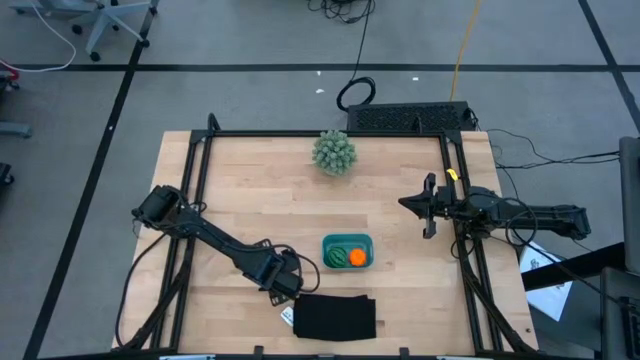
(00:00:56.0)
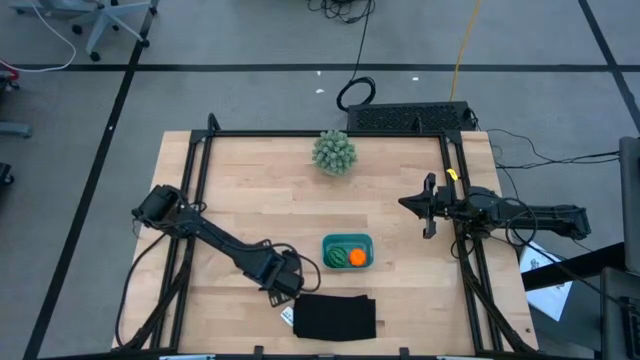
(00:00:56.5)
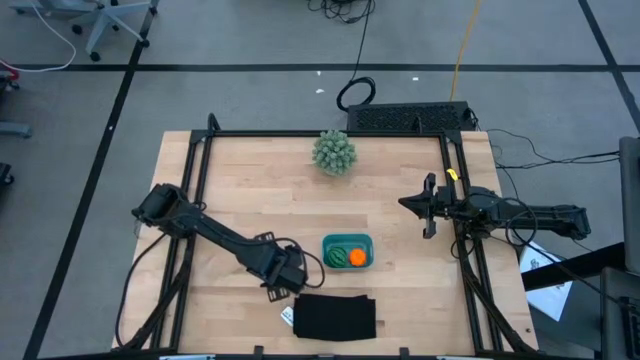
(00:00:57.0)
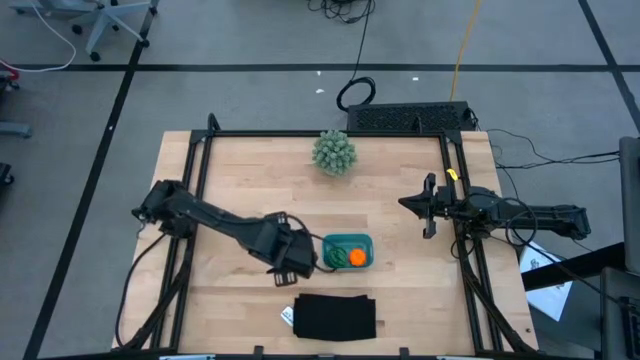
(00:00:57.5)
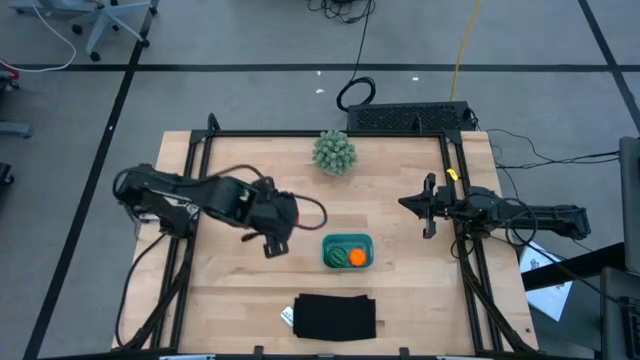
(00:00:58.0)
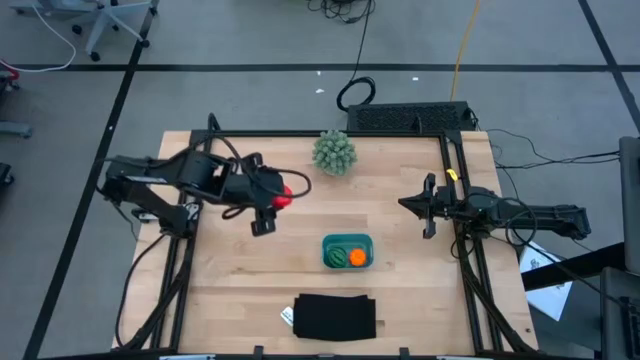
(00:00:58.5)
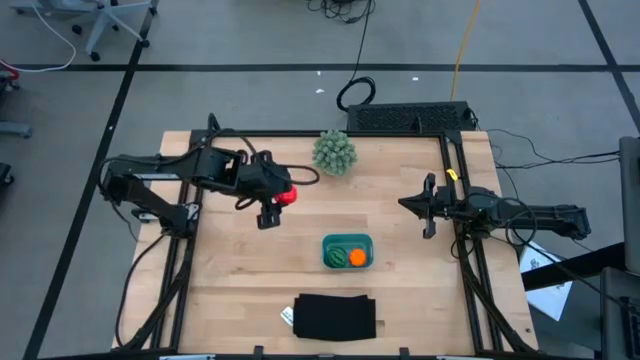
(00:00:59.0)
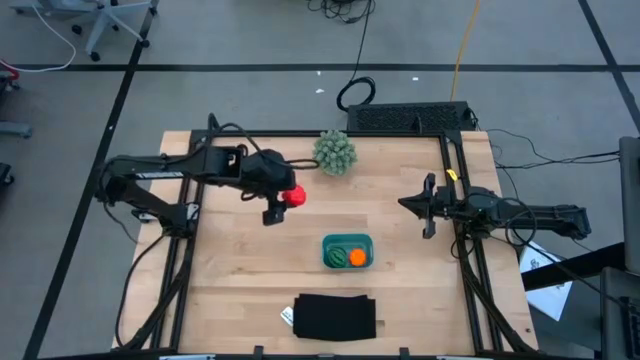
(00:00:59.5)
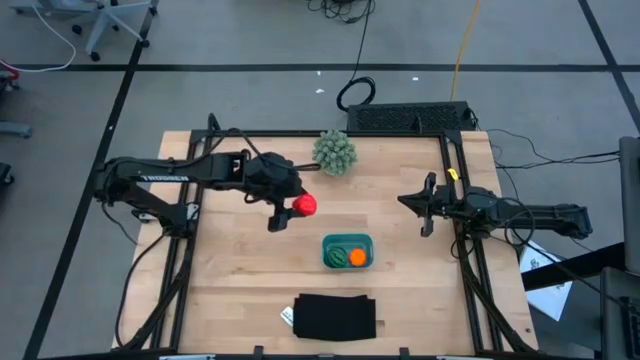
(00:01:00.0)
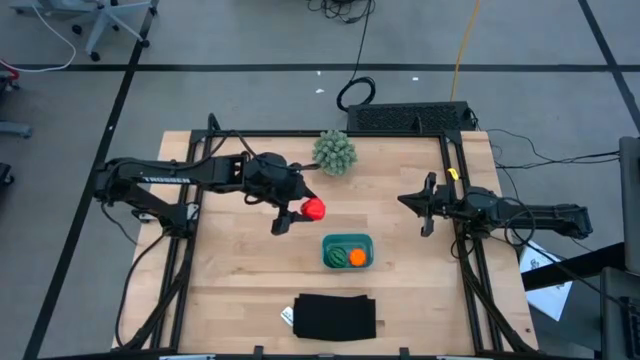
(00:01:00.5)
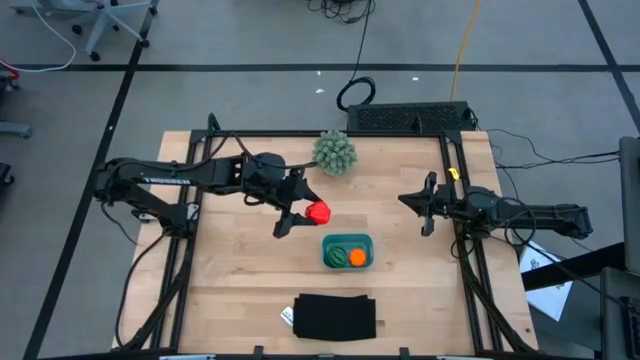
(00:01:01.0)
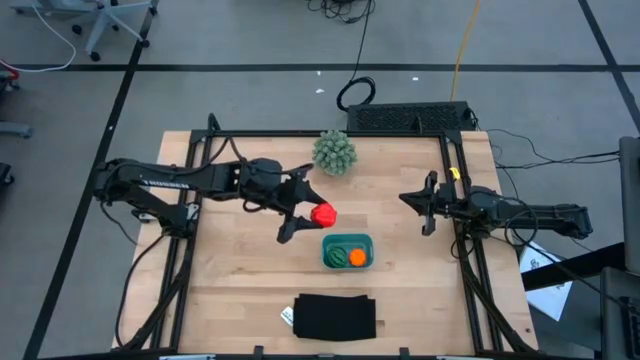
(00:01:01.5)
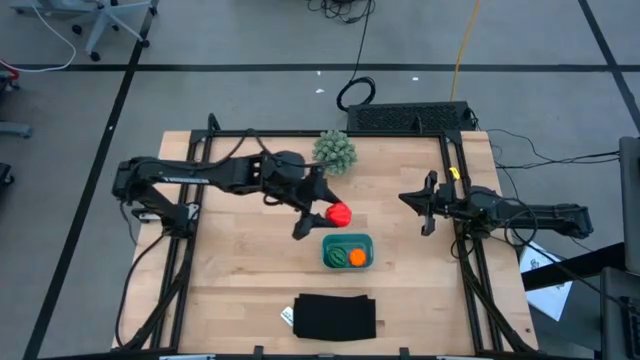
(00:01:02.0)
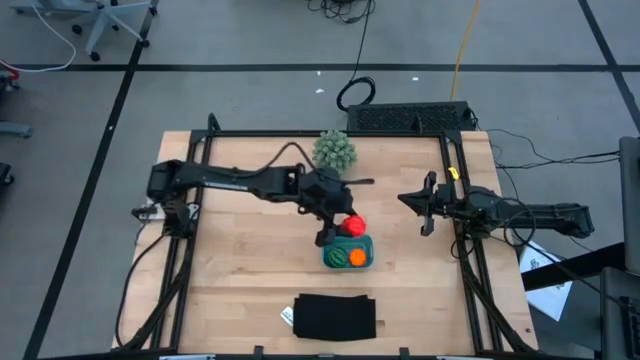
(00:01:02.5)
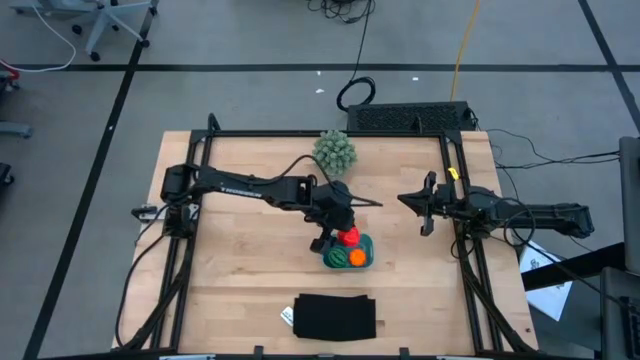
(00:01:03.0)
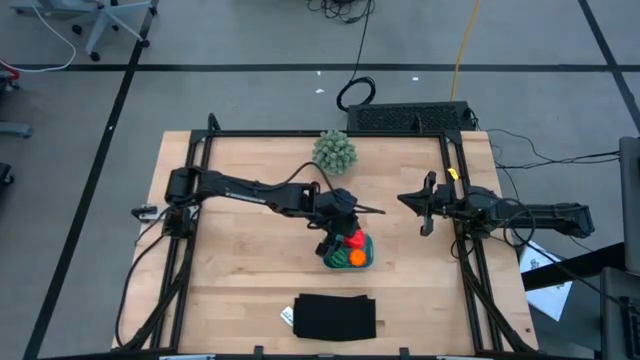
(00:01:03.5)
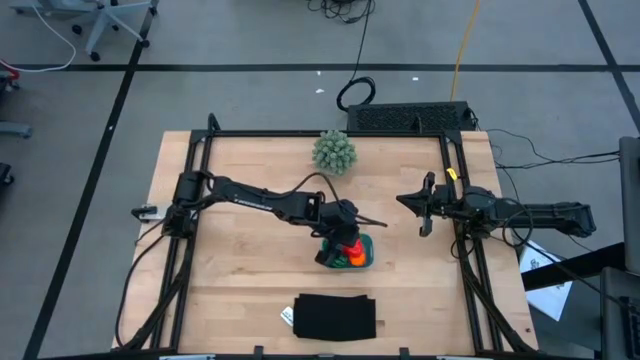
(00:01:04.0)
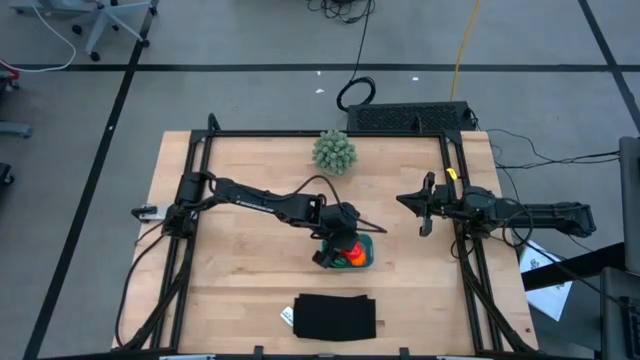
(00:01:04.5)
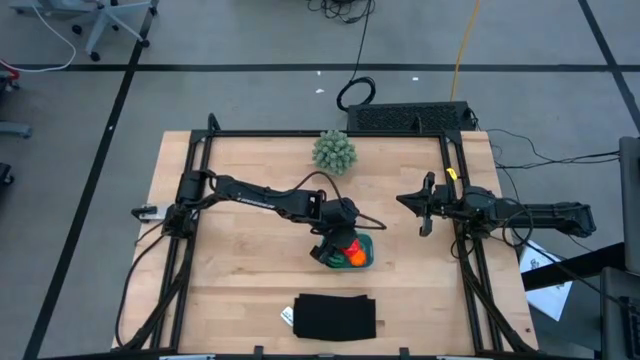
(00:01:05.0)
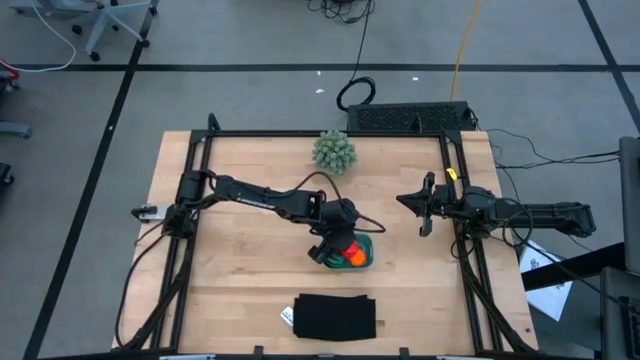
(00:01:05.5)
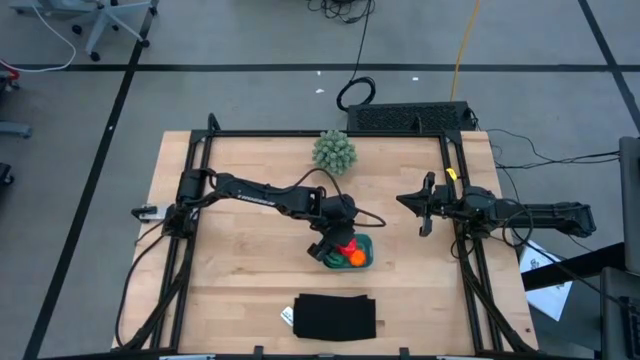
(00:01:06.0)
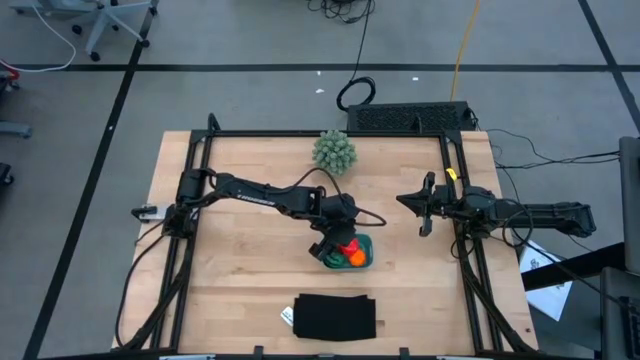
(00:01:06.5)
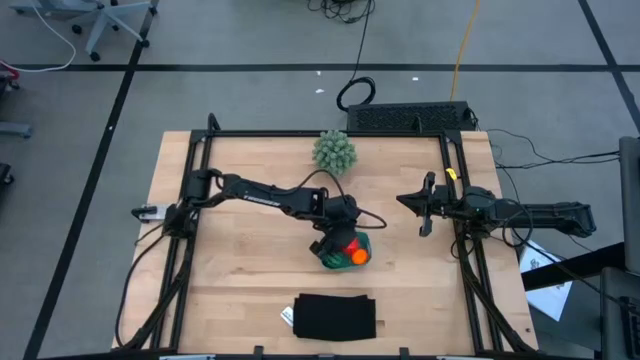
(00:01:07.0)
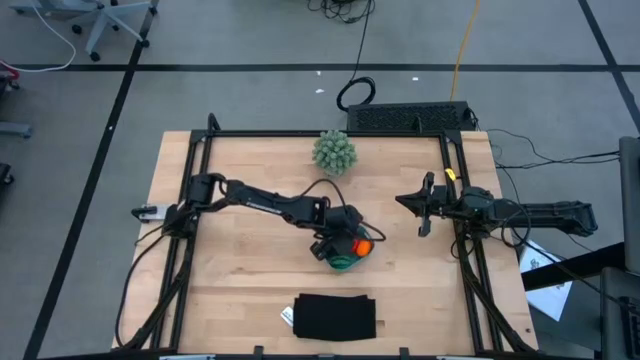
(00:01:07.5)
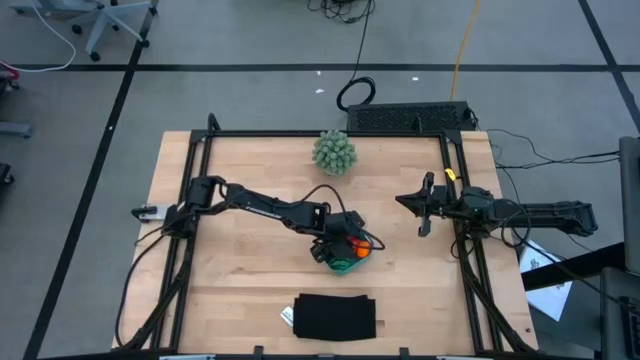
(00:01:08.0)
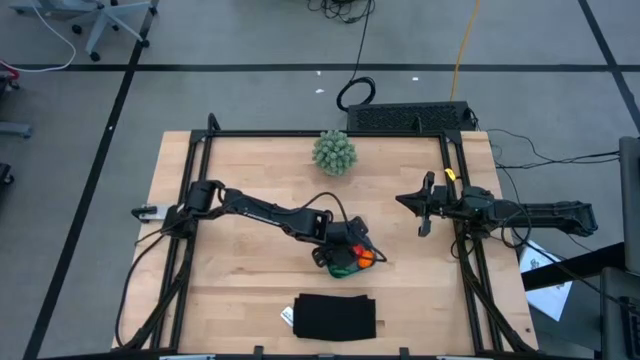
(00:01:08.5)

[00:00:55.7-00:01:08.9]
Task: Pick and placing Produce into tupperware
Put the apple into the blue bin

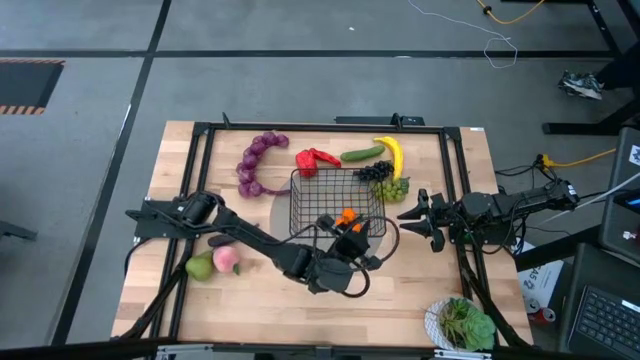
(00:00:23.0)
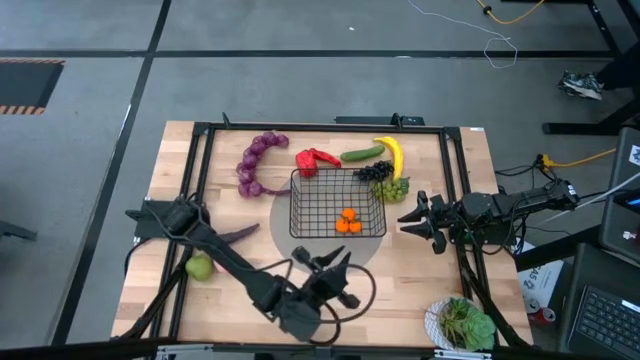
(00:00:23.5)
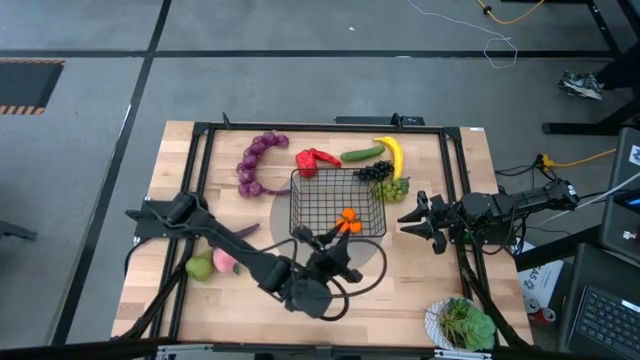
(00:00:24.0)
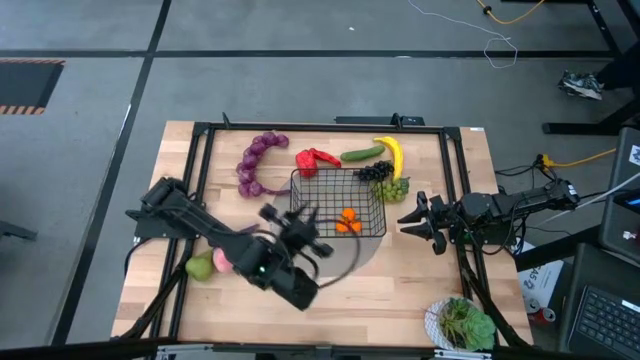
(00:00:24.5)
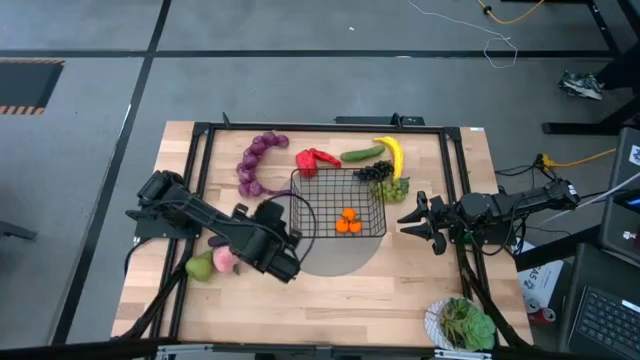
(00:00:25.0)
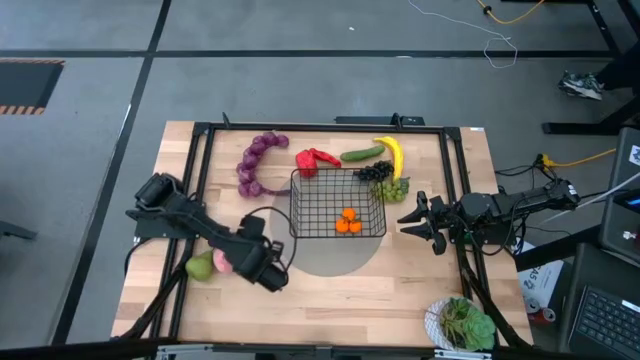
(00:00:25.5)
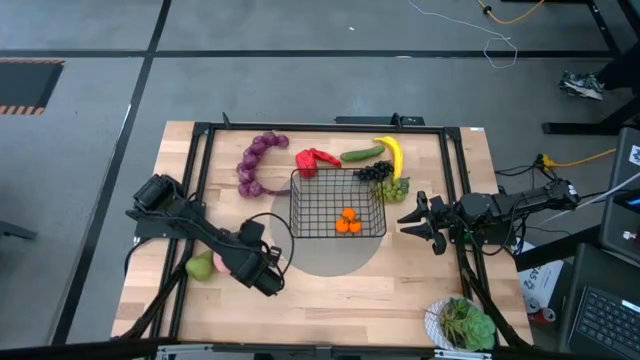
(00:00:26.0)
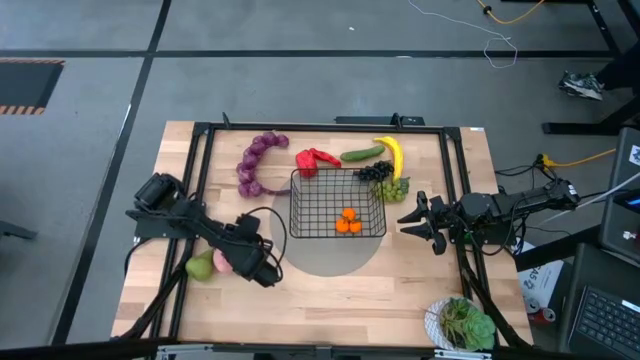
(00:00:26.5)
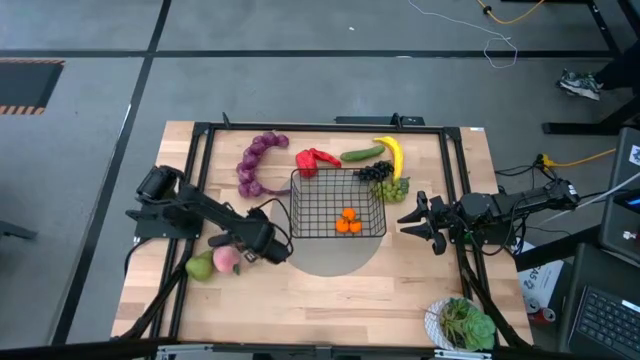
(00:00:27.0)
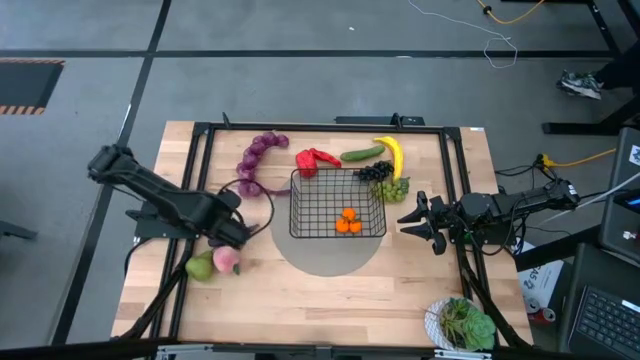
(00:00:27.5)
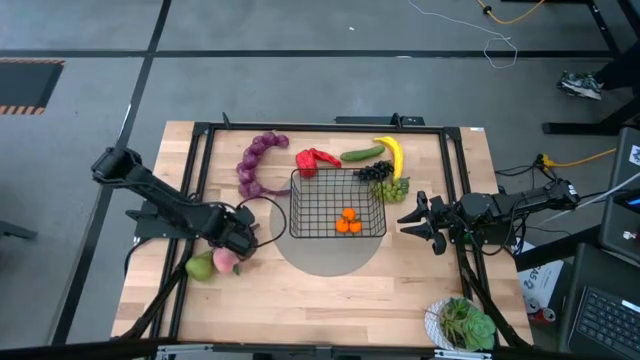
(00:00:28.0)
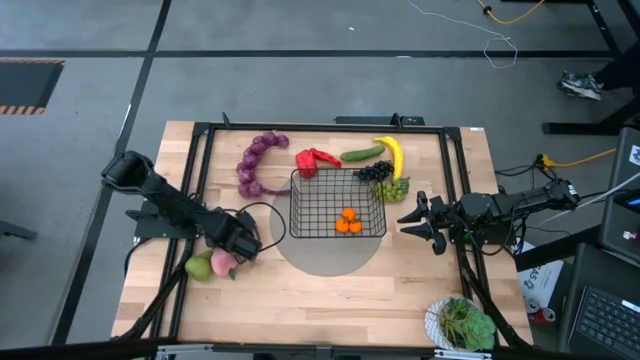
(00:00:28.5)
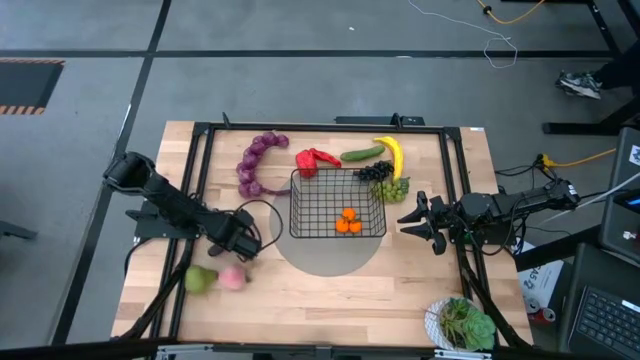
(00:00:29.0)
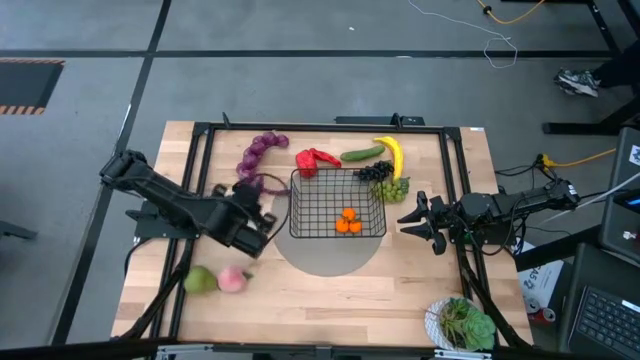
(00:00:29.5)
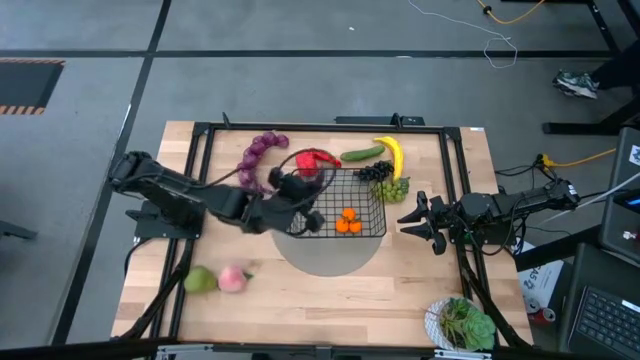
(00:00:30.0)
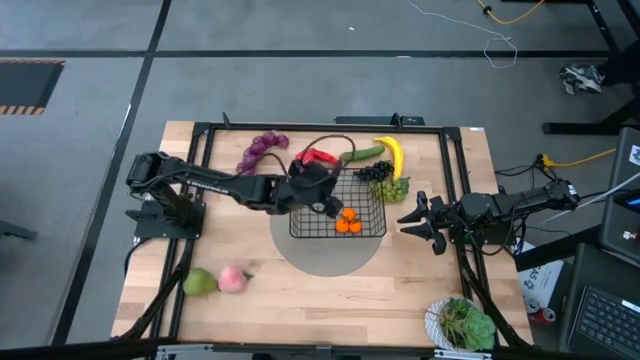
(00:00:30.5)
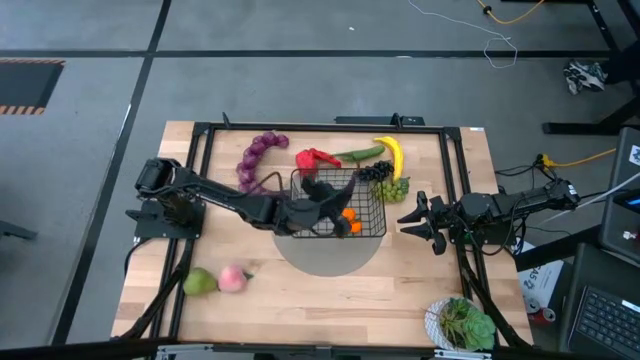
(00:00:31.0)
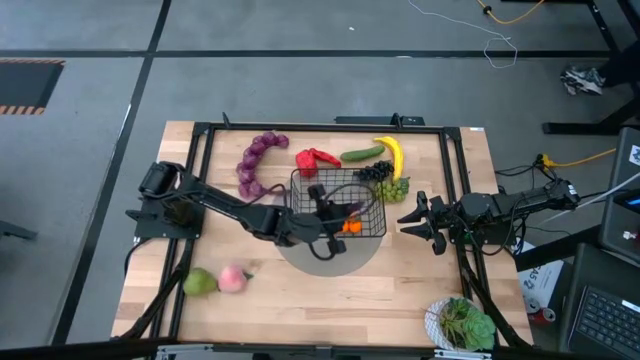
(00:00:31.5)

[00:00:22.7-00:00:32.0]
Task: Build produce basket
Put the eggplant into the wire basket
